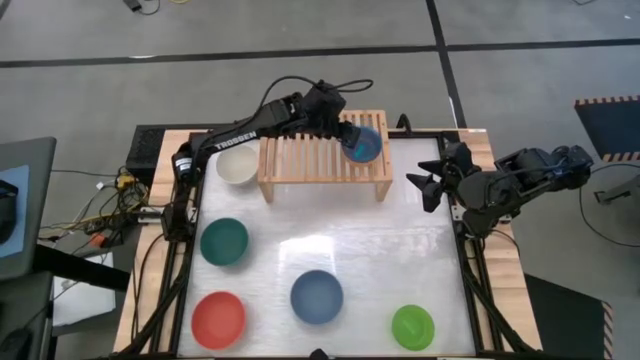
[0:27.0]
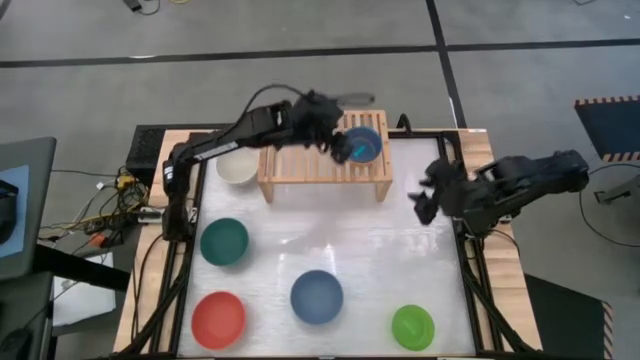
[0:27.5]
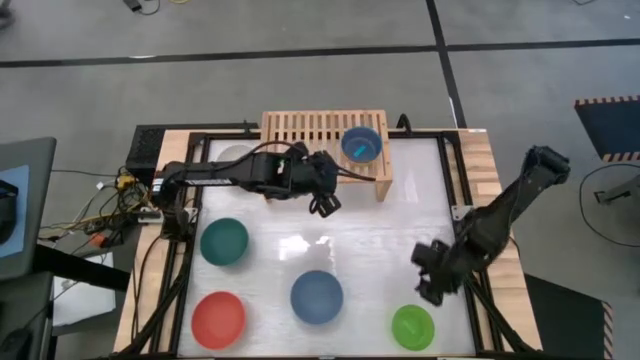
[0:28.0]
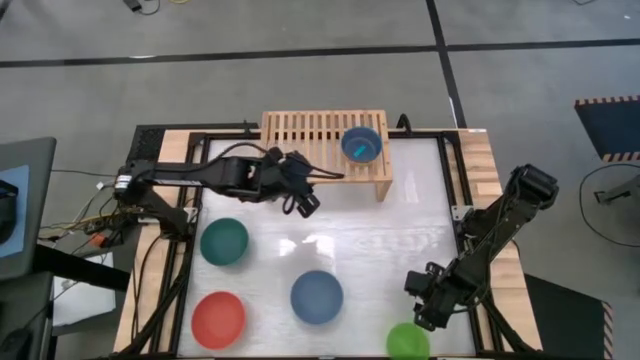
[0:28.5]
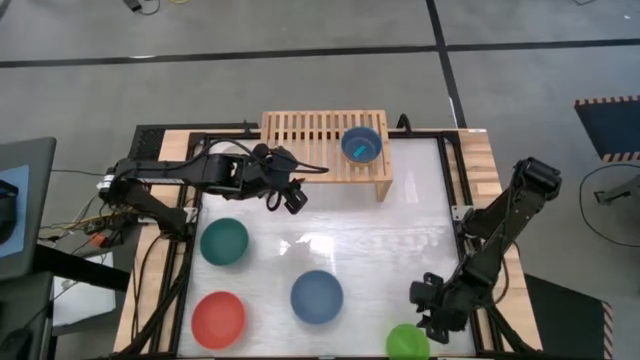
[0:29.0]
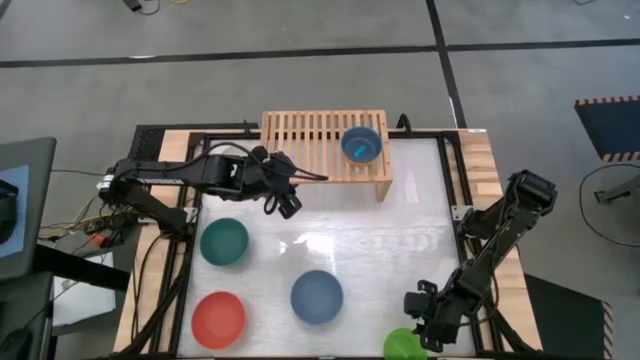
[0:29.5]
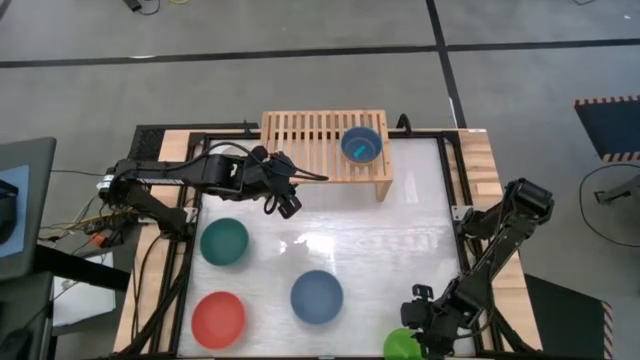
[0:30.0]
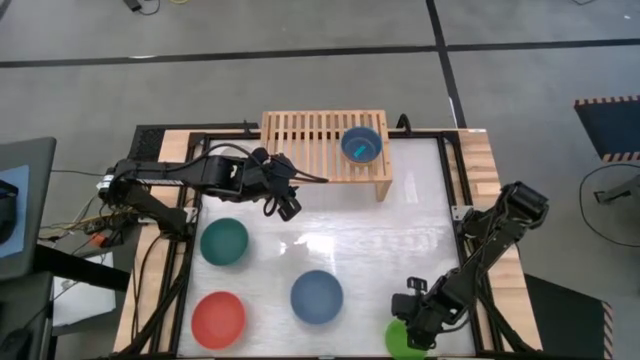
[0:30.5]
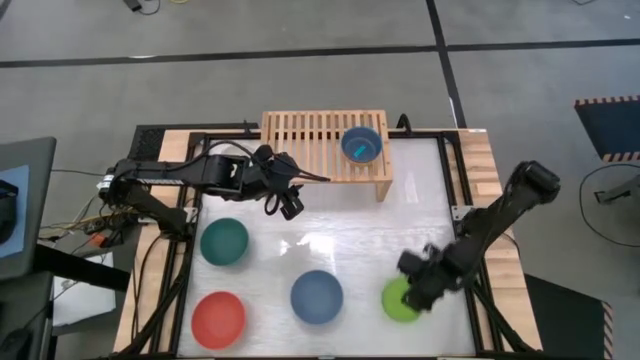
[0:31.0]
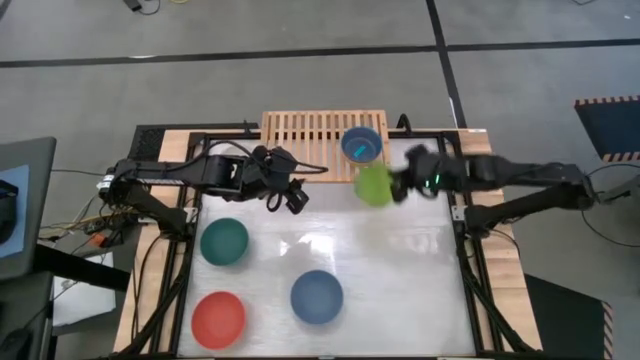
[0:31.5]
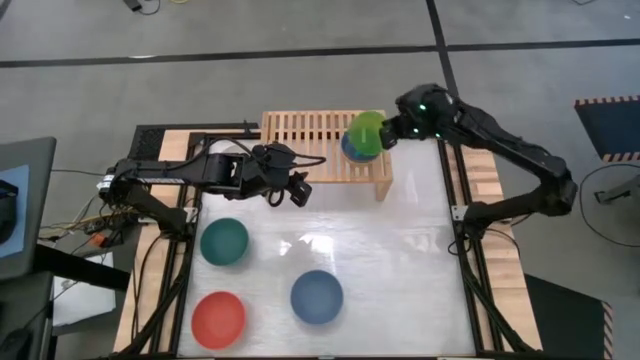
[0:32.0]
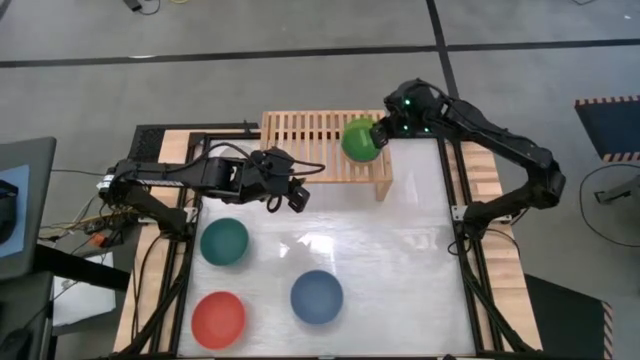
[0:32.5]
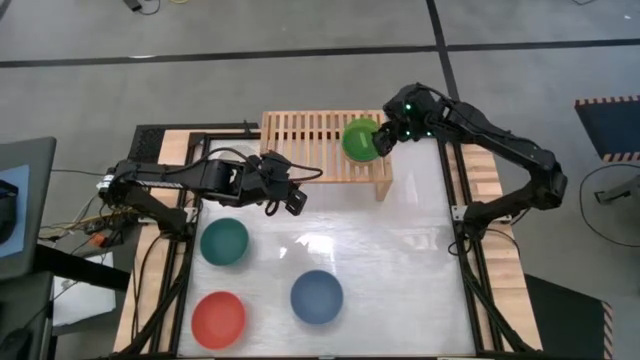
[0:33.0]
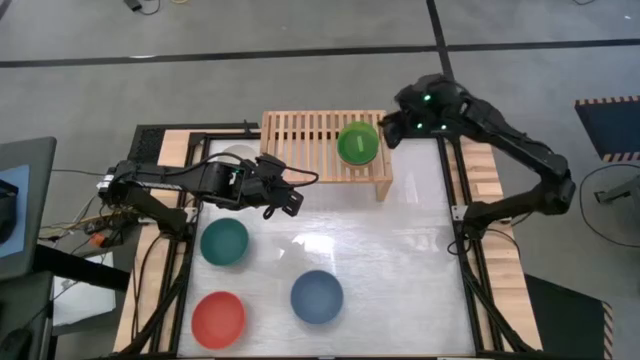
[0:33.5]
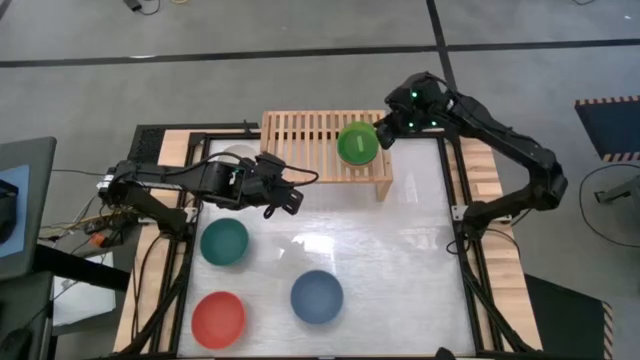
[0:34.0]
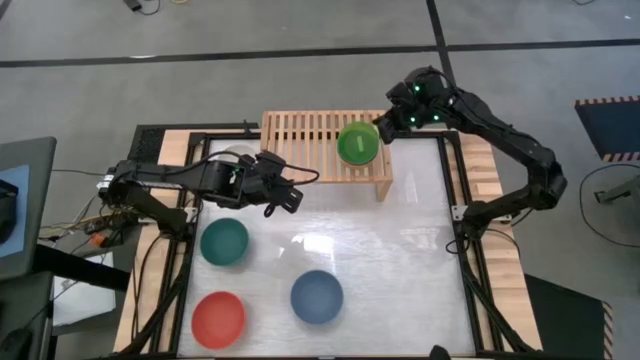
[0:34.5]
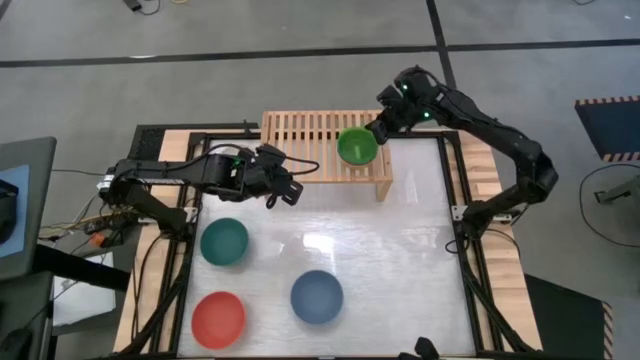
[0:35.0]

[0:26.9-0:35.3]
Task: Place and stack bowls onto a shelf
Stack the small green bowl on the small blue bowl on the shelf

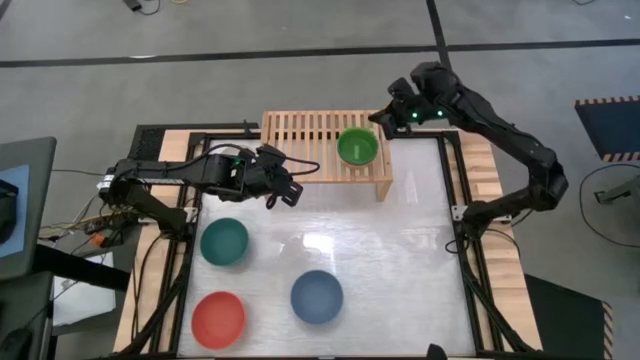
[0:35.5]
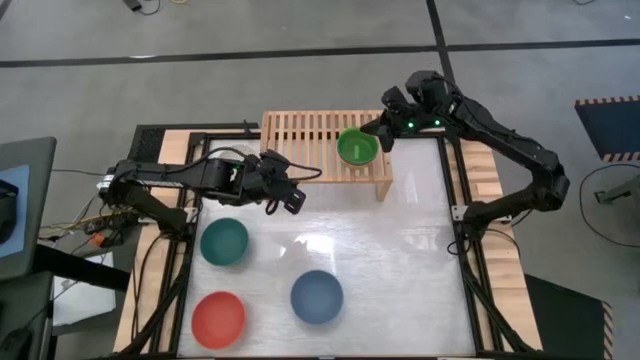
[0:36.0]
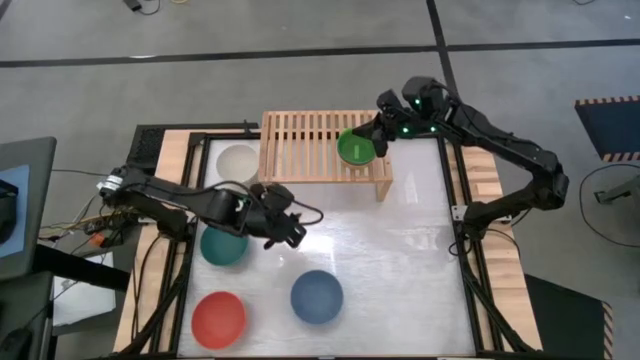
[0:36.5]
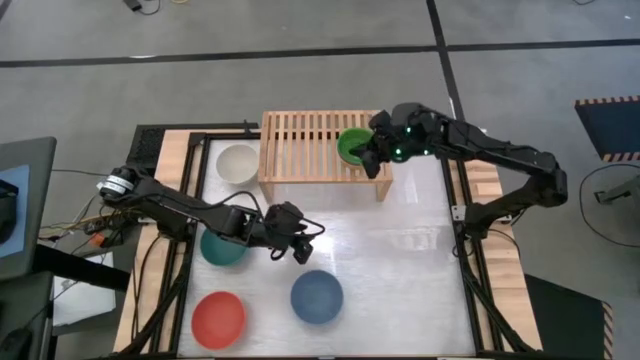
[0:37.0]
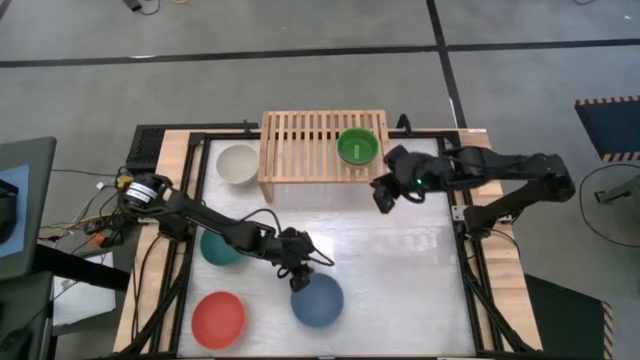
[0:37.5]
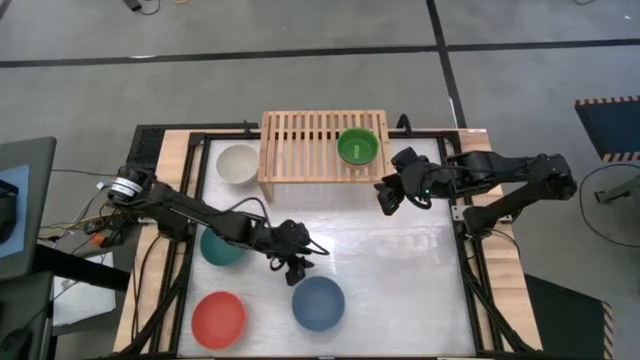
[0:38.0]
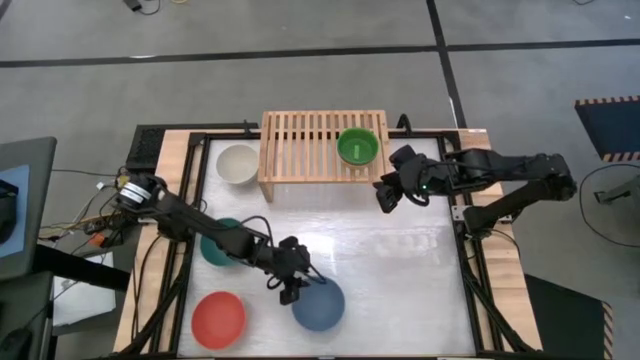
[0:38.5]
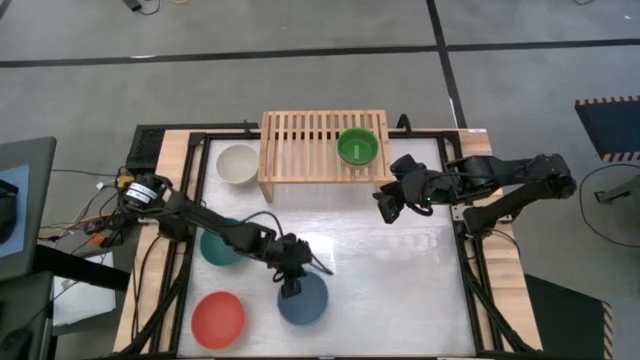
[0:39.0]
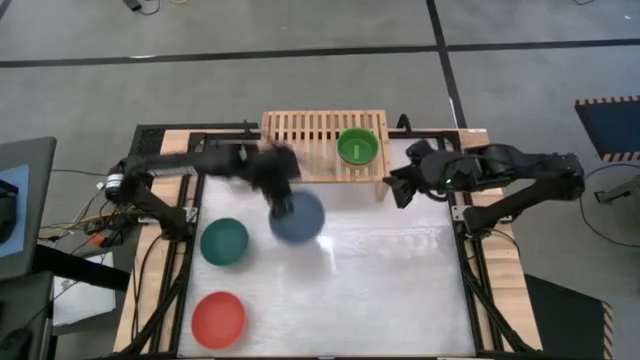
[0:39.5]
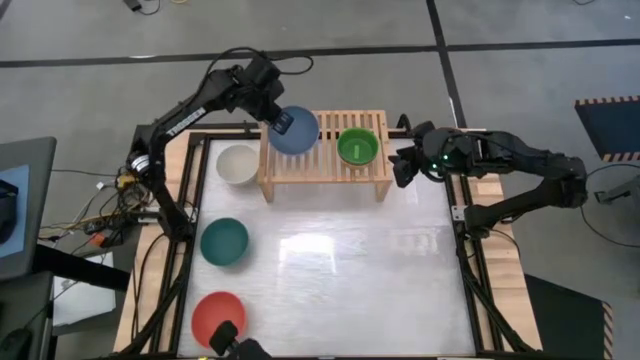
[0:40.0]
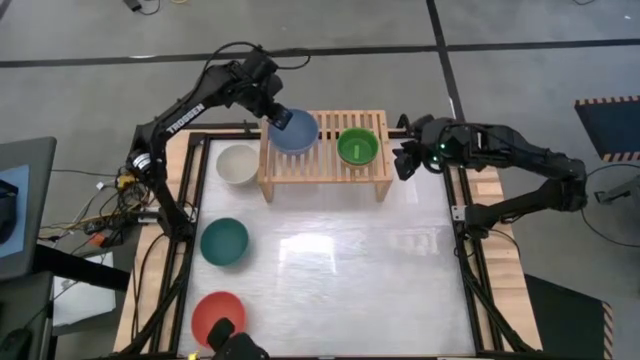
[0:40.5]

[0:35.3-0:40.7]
Put the large light blue bowl on the shelf

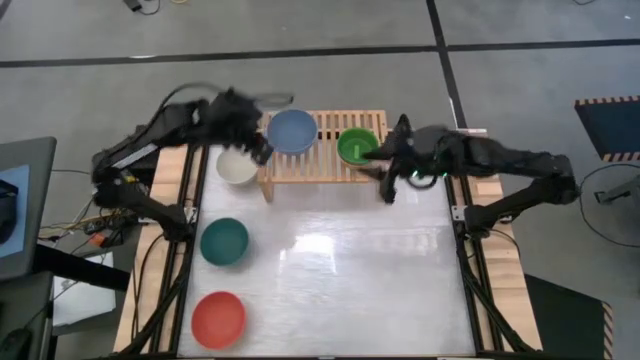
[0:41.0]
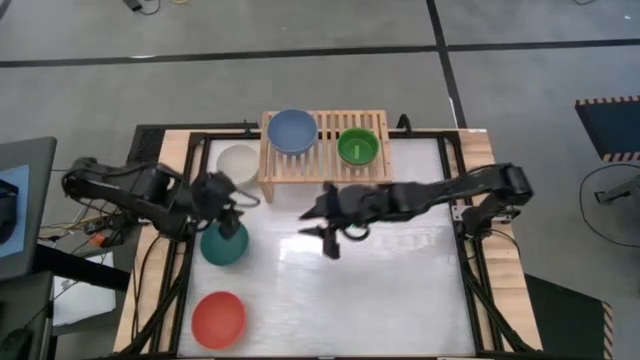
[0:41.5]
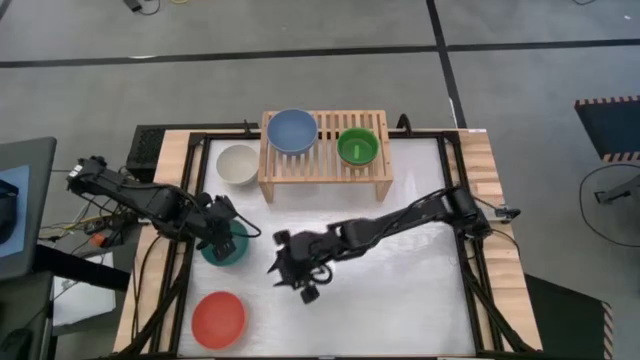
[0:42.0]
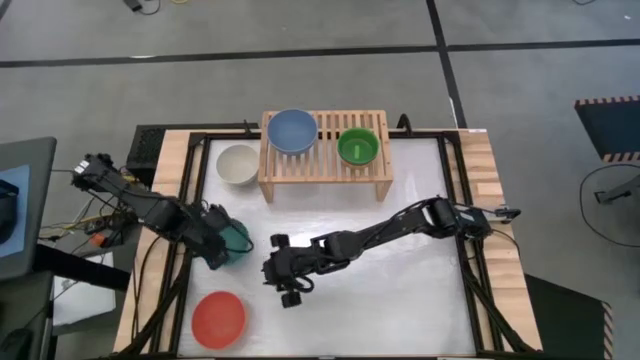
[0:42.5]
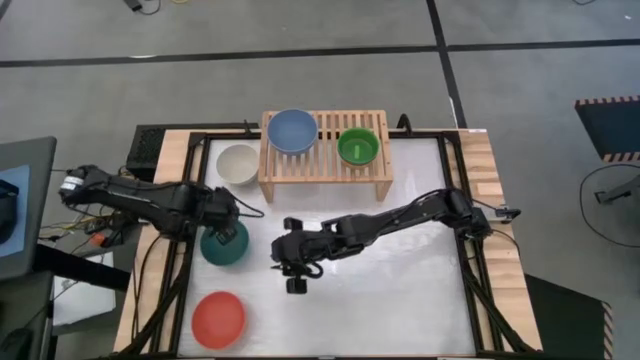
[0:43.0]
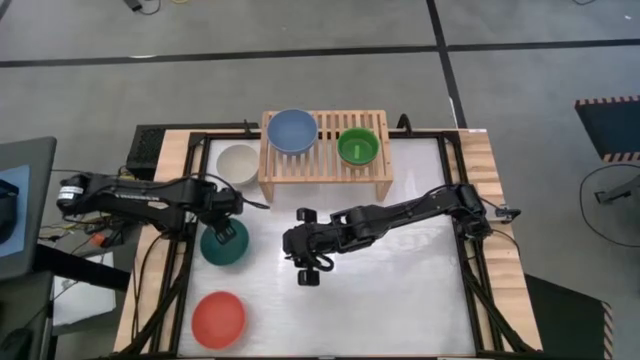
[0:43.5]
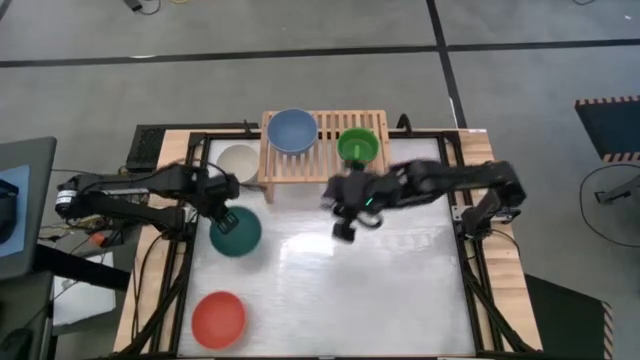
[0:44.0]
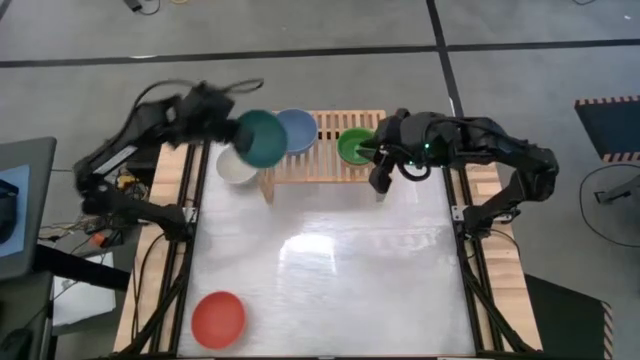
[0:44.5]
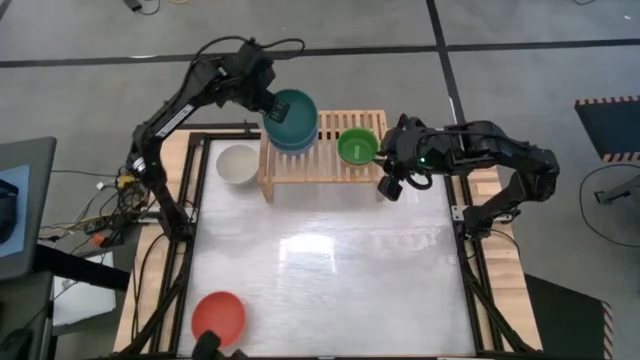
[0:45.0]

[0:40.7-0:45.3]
Stack the large dark blue bowl on the large light blue bowl on the shelf

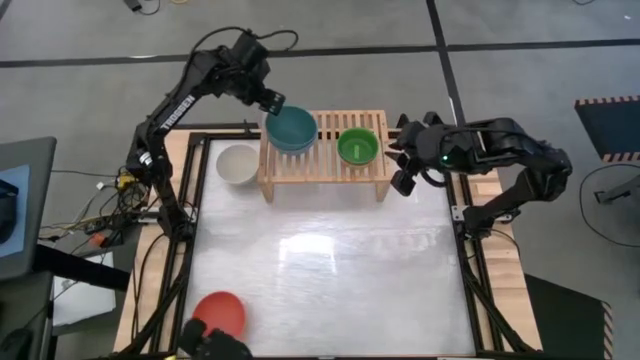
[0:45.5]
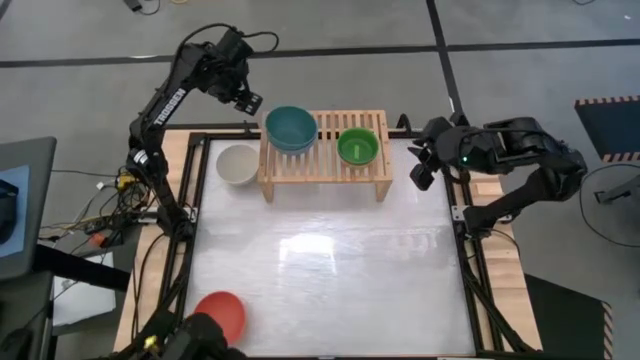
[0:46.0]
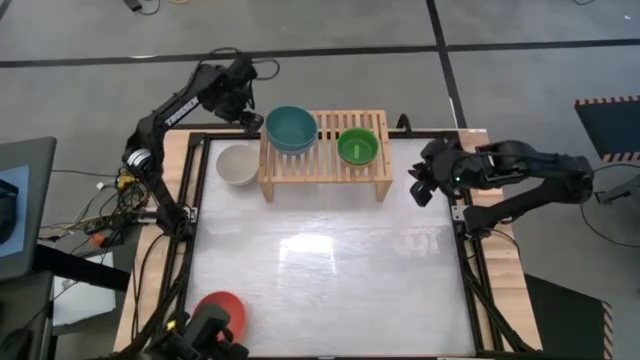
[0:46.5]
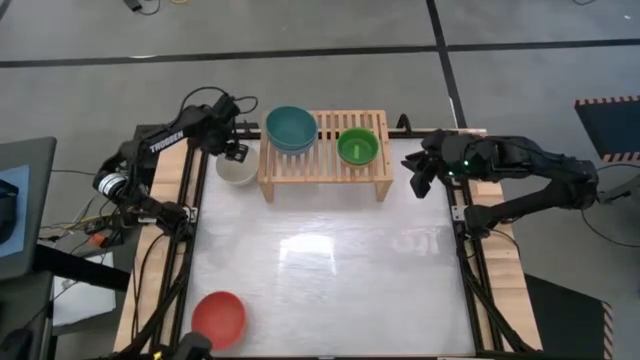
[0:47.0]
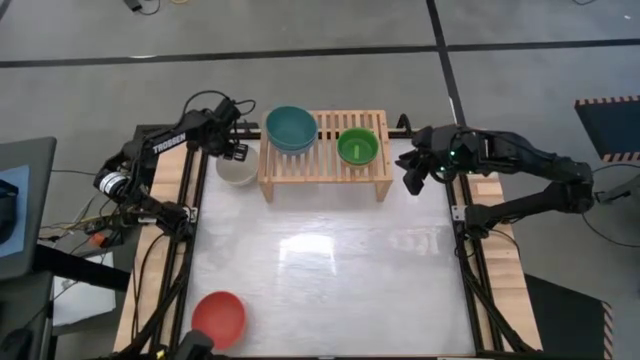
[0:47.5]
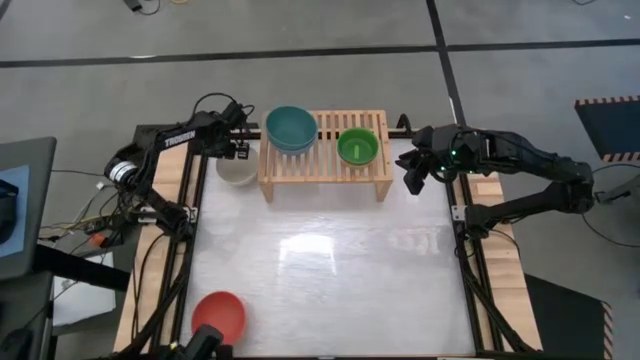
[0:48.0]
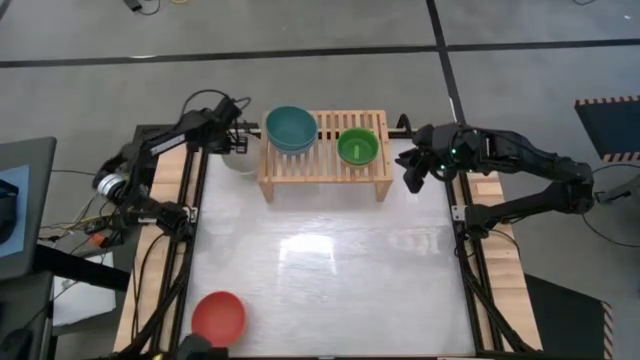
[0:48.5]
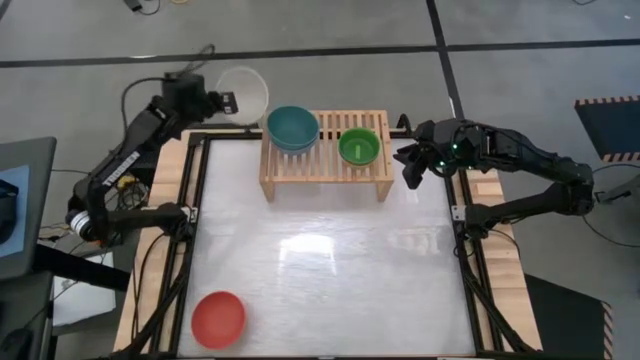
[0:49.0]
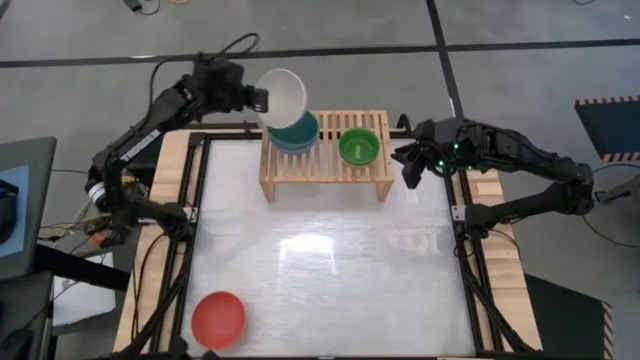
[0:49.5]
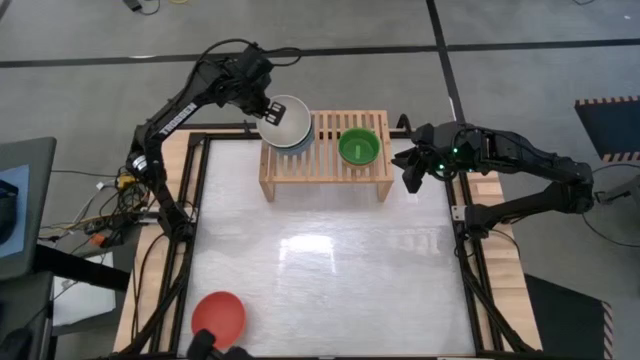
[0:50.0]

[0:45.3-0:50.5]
Stack the large white bowl on the large dark blue bowl on the shelf
